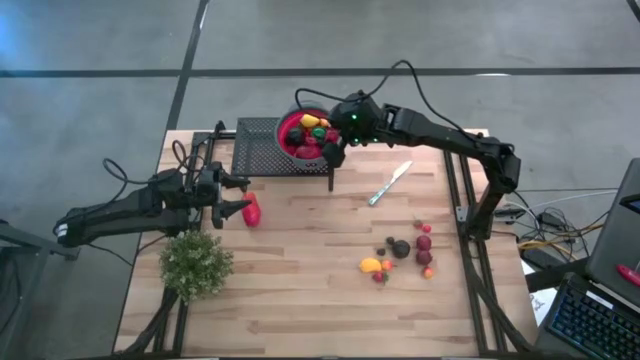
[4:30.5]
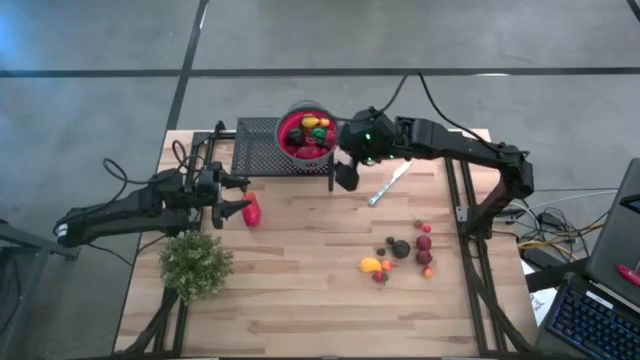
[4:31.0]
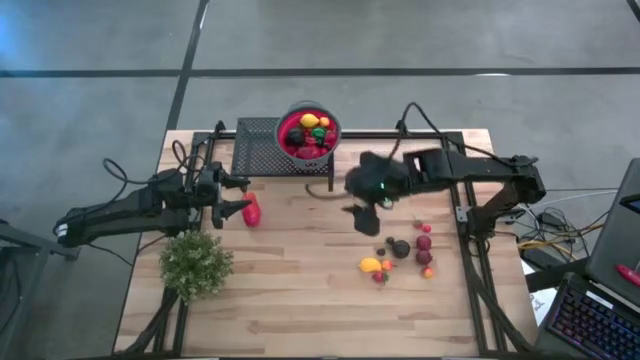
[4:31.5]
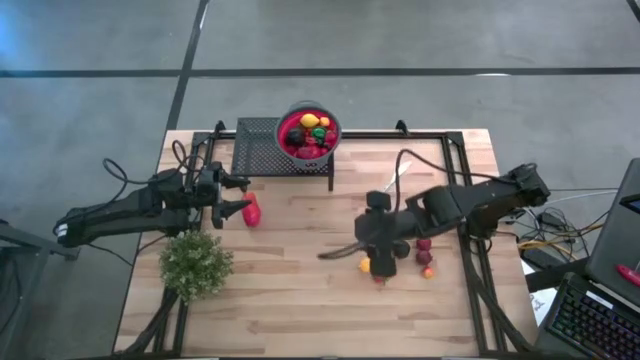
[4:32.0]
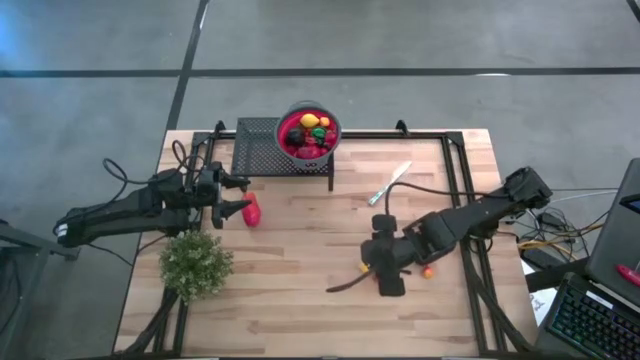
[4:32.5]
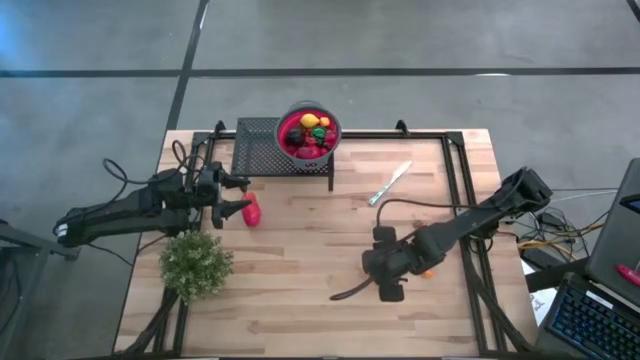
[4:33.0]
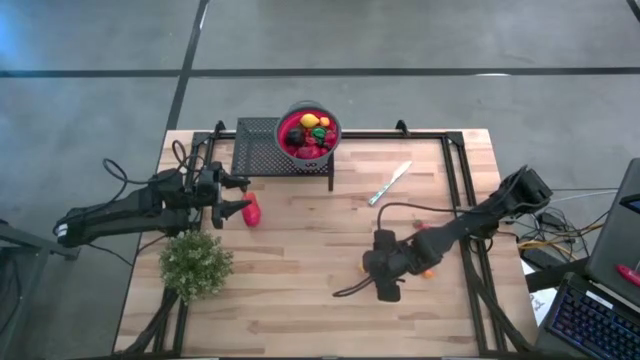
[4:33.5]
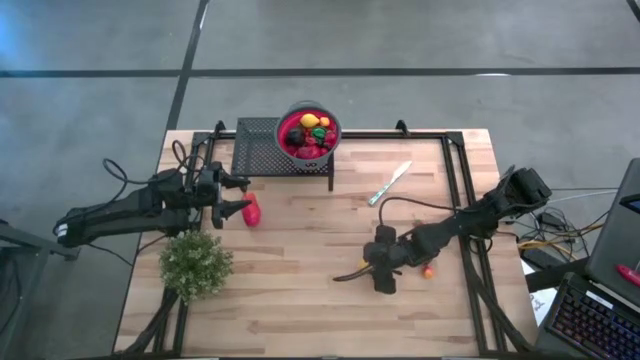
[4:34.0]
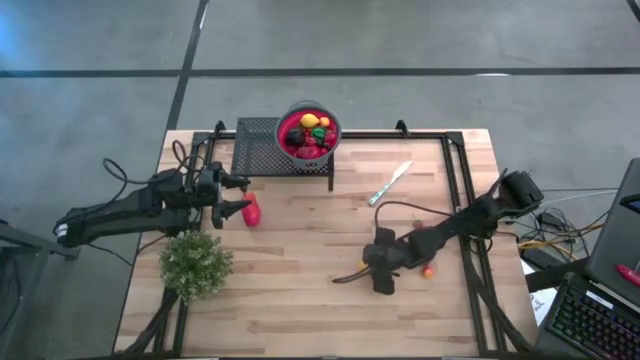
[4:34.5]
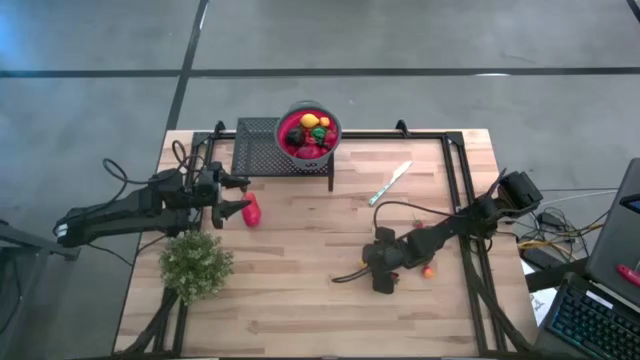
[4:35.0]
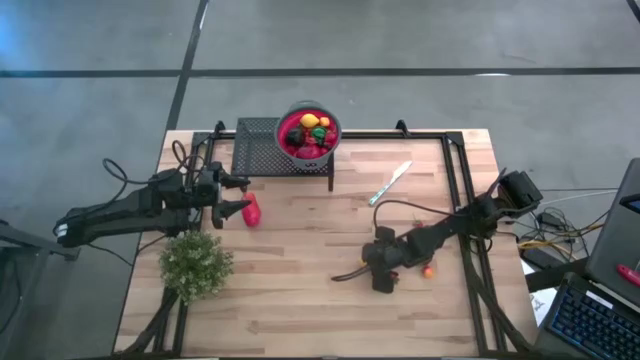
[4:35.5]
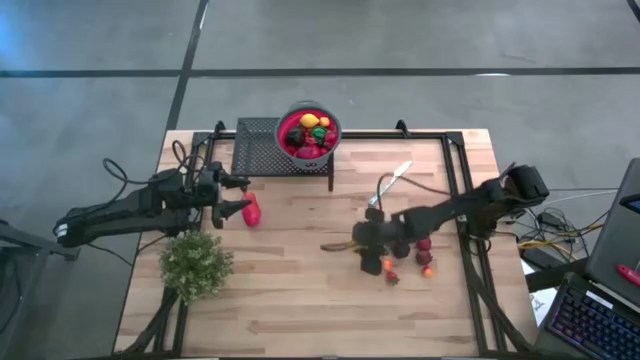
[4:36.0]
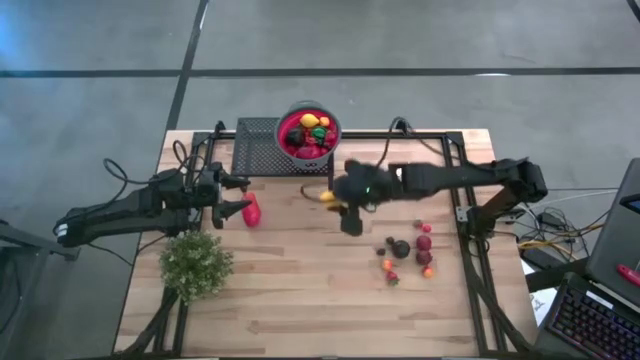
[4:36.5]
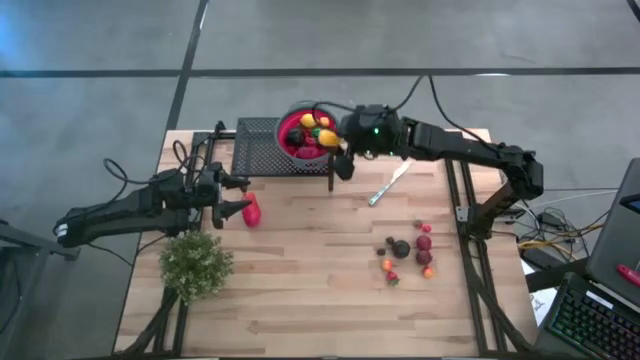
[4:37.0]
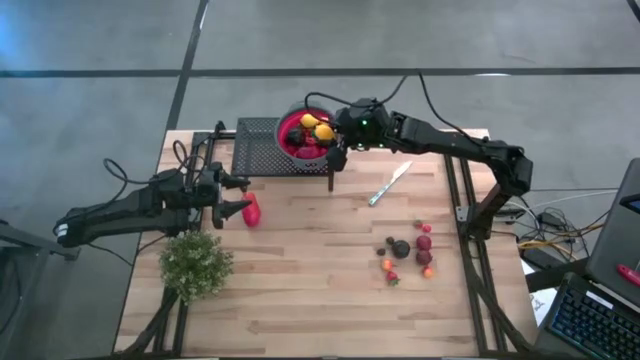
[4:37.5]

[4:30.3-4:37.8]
Task: Pick & Place Fruit
Put the yellow mango into the red gray strainer bowl on the shelf

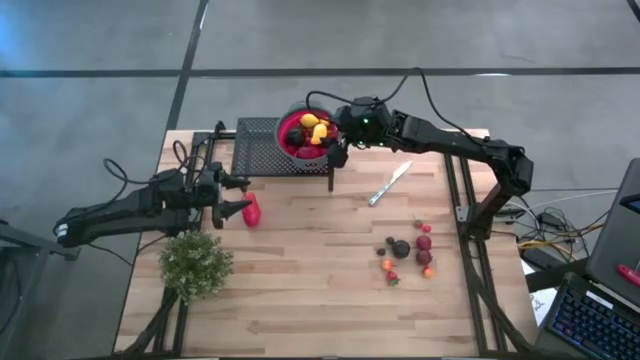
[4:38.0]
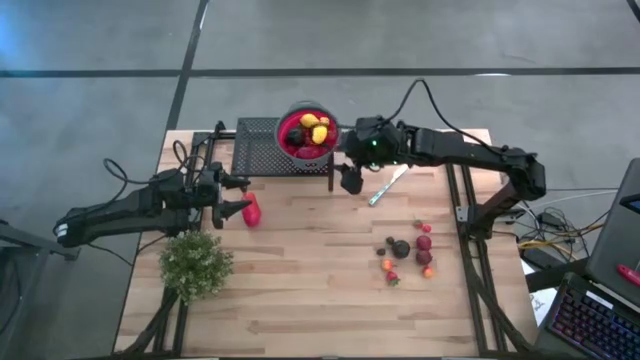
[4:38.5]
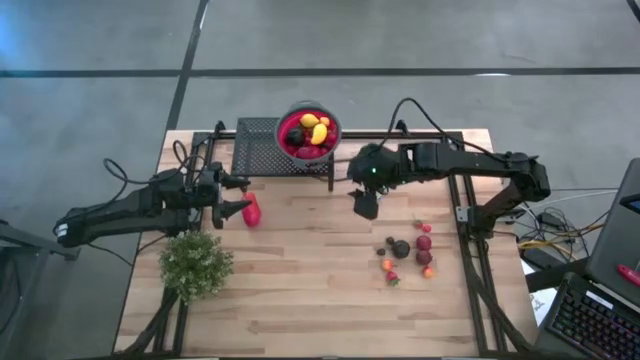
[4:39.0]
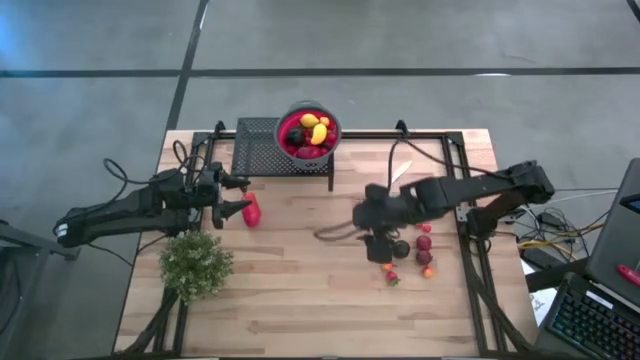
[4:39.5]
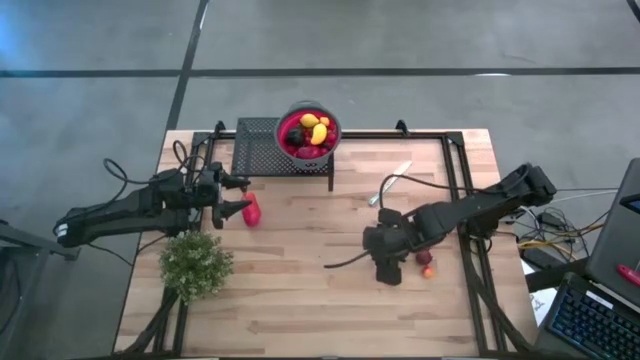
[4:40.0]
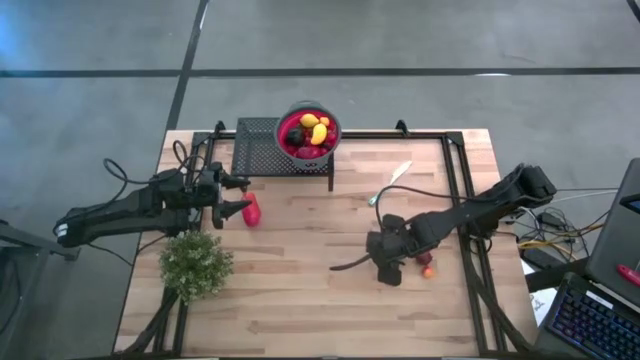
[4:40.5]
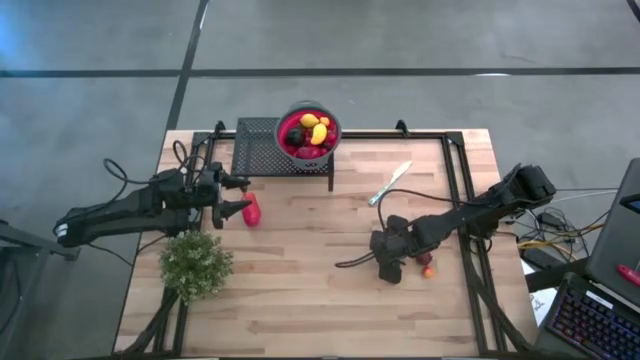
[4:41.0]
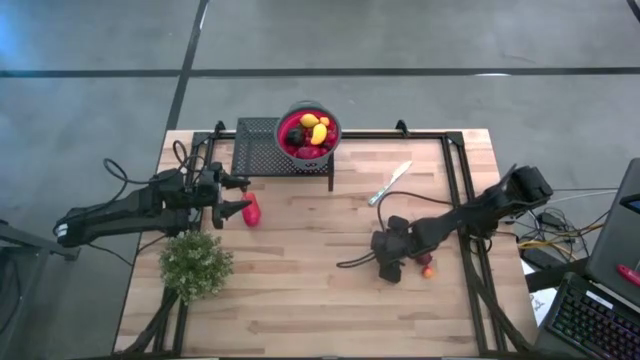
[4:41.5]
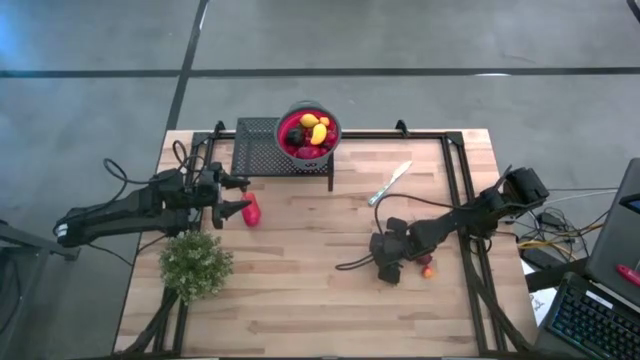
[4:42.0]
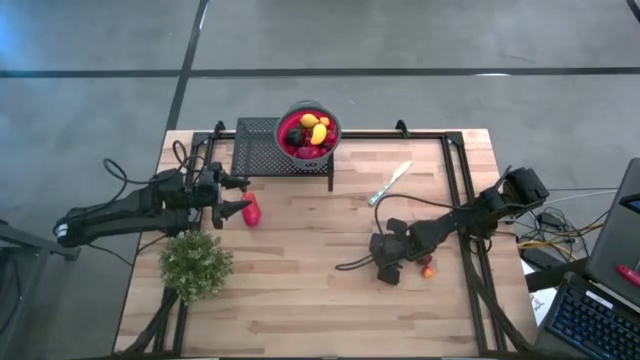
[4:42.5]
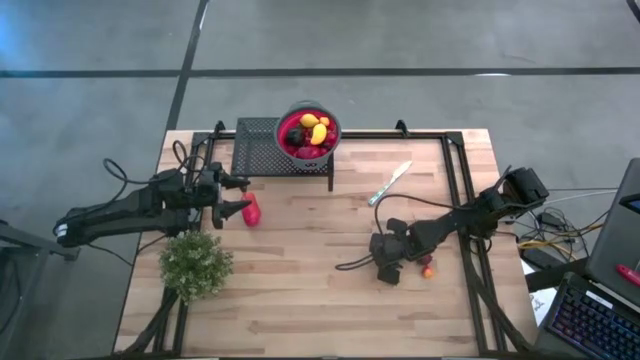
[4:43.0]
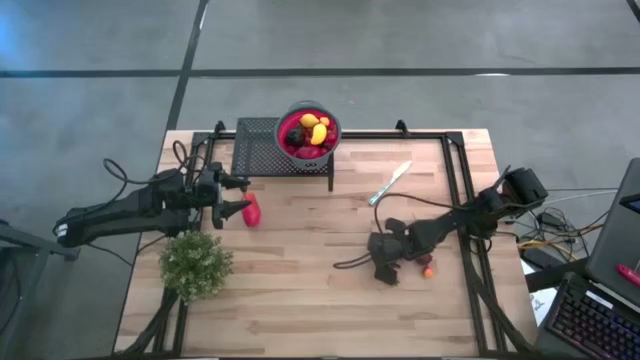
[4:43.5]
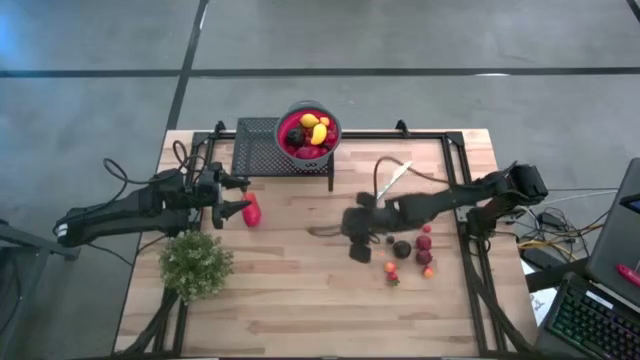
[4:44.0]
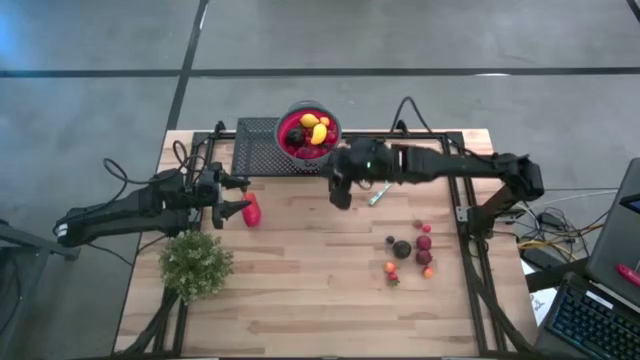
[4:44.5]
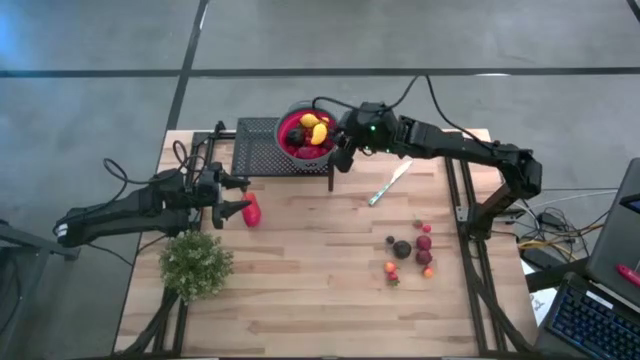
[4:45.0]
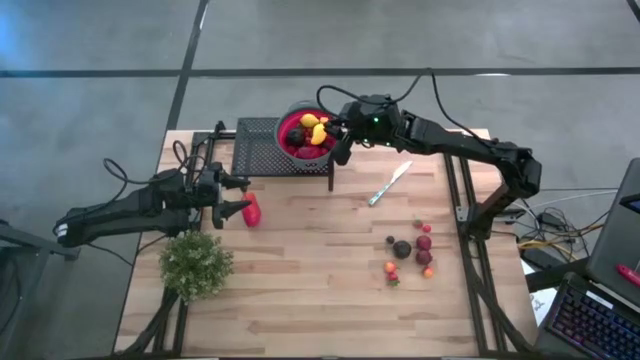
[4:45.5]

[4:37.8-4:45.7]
Put the blue raspberry into the red gray strainer bowl on the shelf

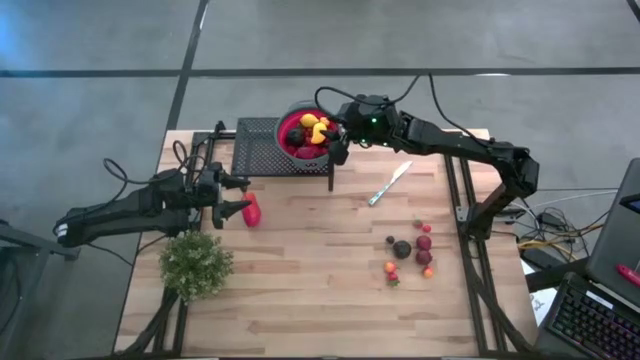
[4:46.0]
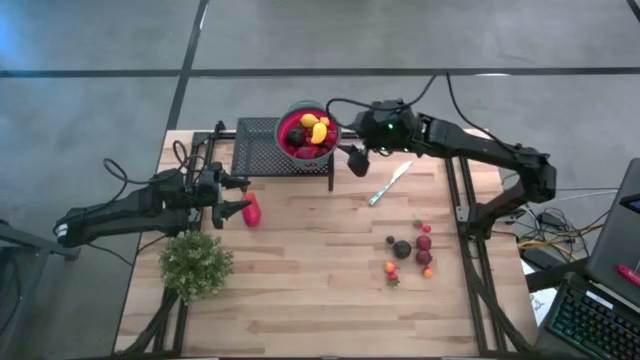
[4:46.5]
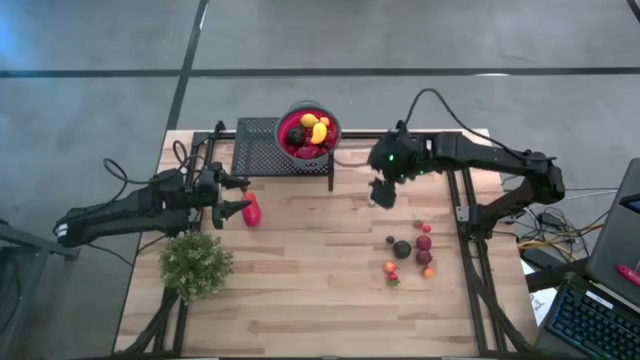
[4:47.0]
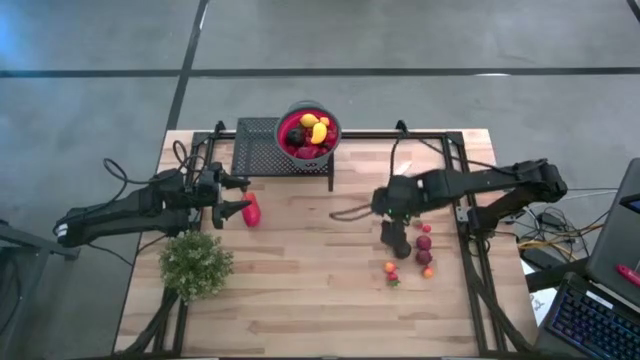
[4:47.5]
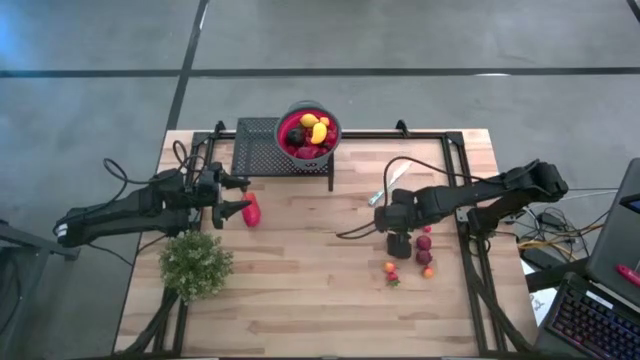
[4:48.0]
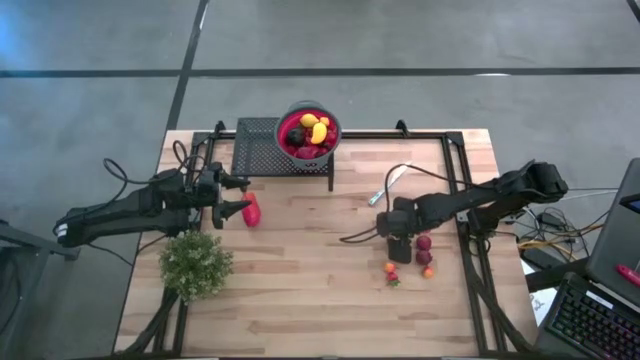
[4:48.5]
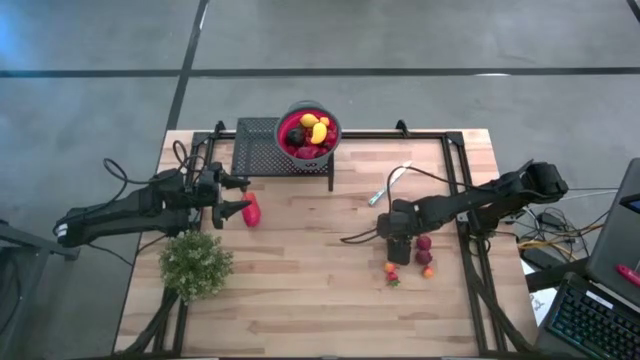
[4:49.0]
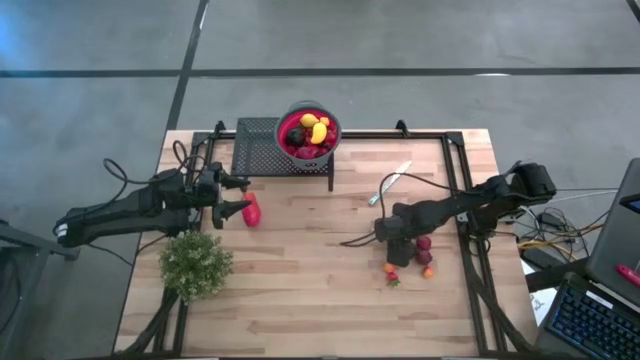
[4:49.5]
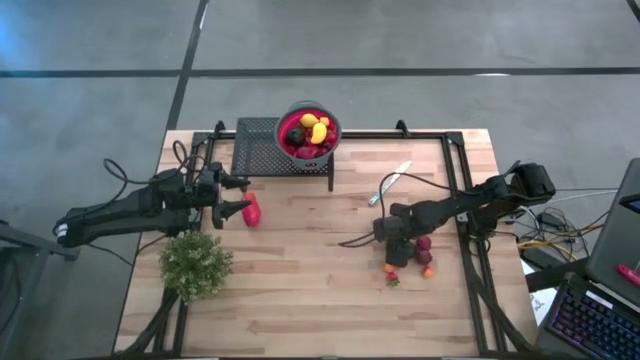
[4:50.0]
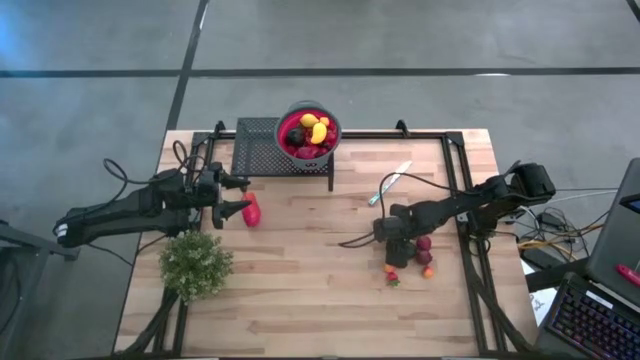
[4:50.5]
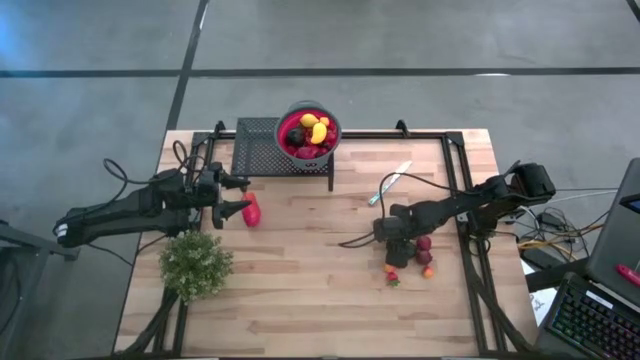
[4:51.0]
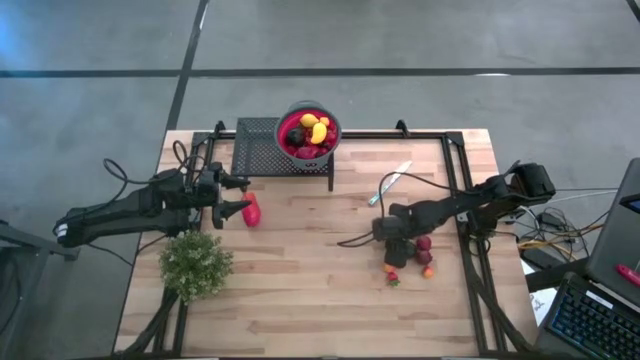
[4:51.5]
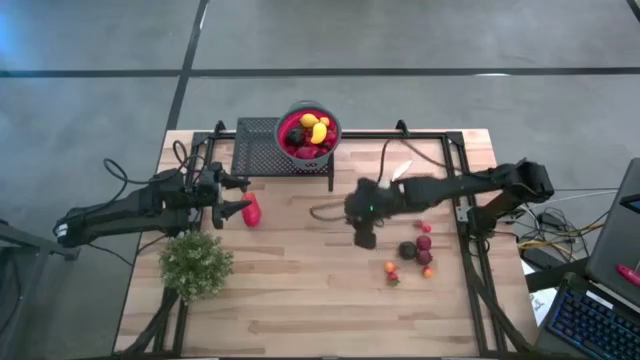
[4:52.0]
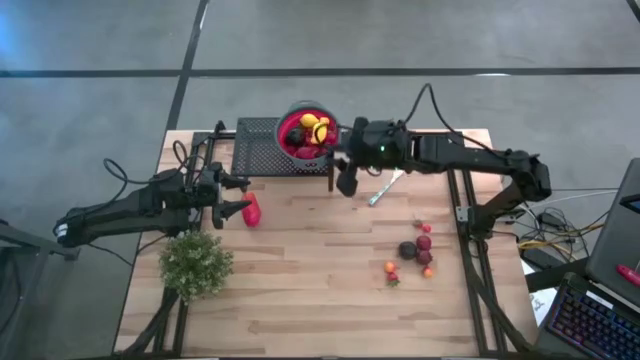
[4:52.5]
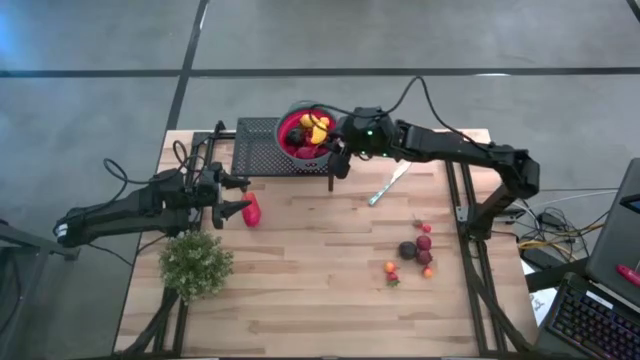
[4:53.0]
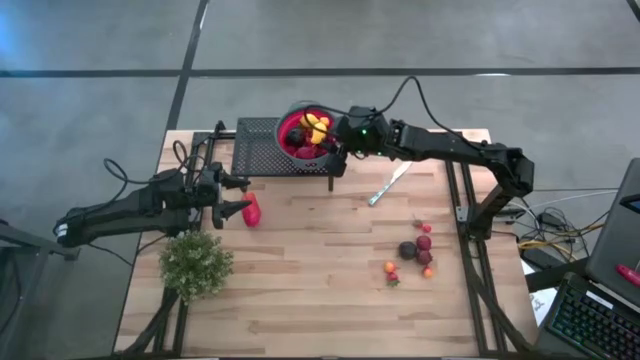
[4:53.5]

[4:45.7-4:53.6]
Put the black cherry into the red gray strainer bowl on the shelf
